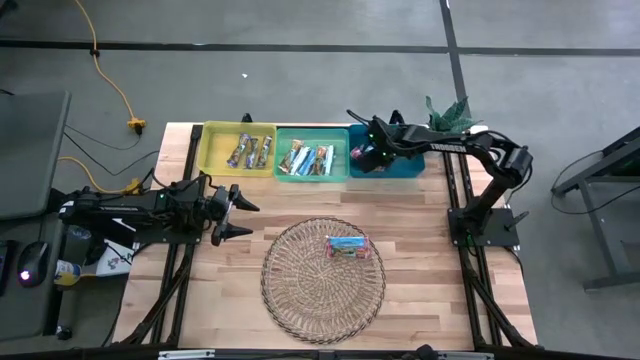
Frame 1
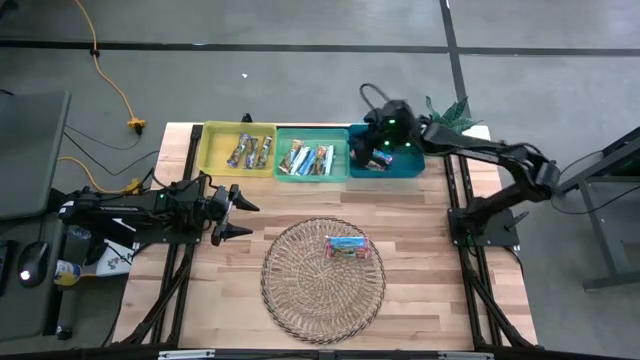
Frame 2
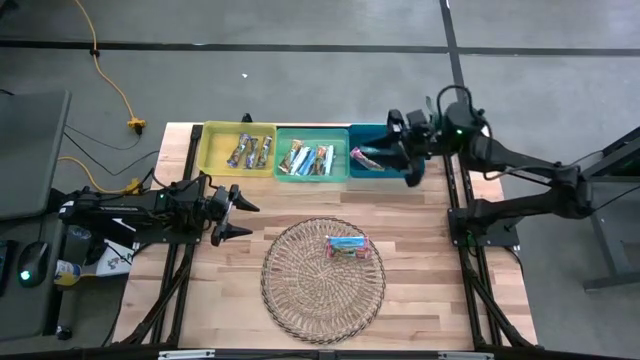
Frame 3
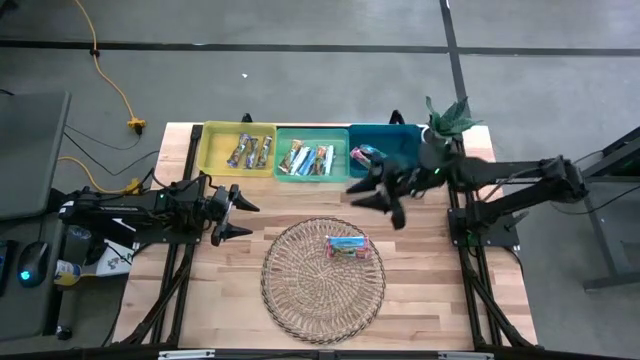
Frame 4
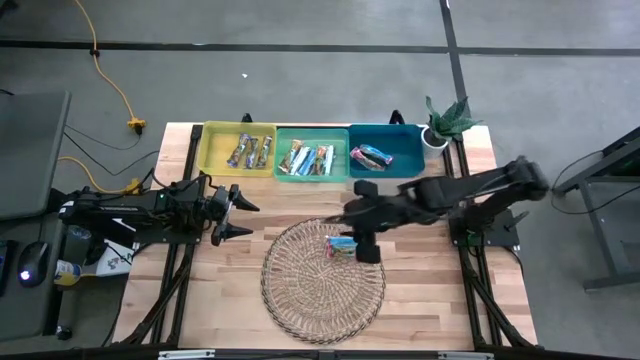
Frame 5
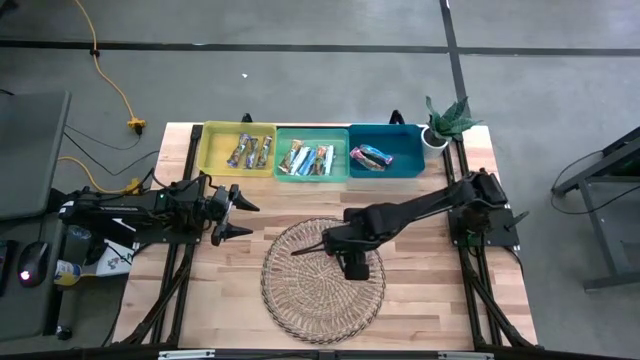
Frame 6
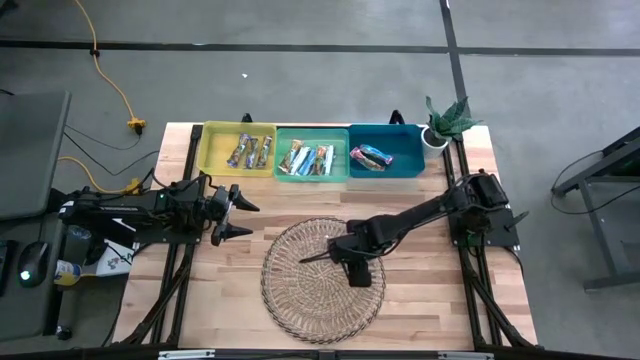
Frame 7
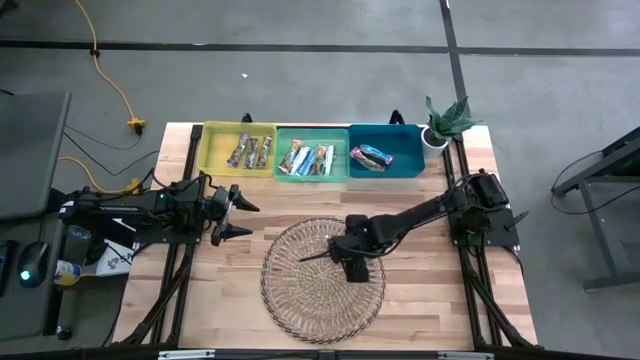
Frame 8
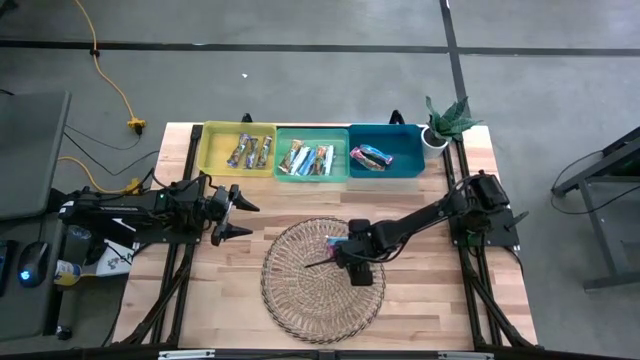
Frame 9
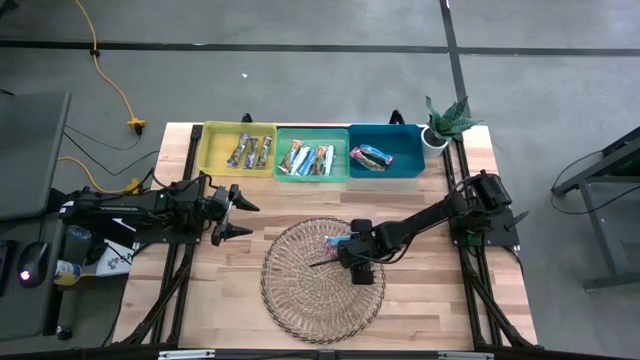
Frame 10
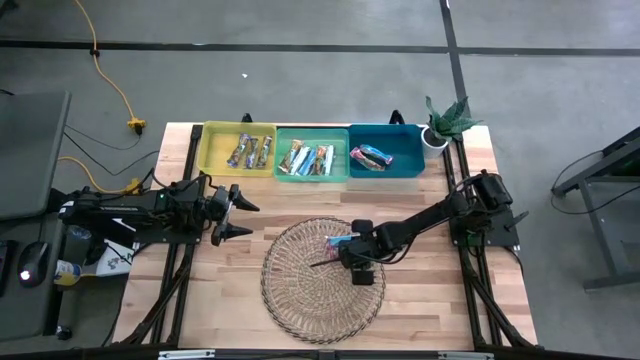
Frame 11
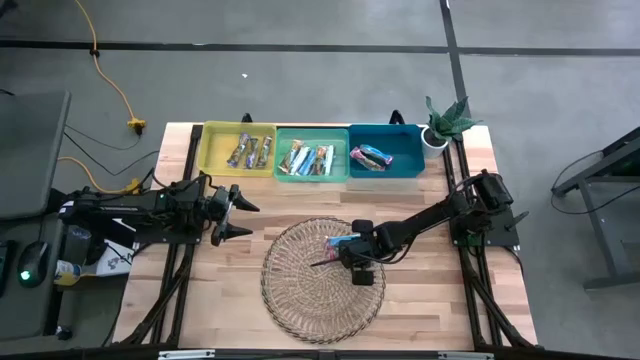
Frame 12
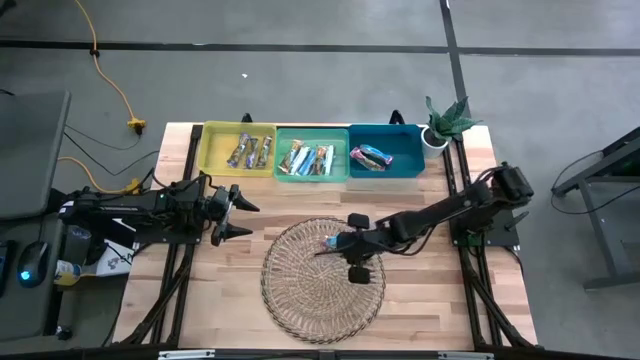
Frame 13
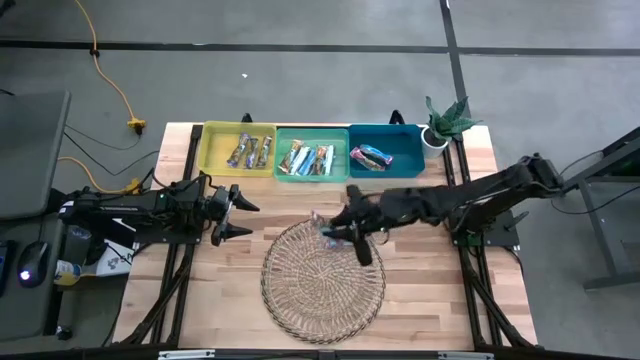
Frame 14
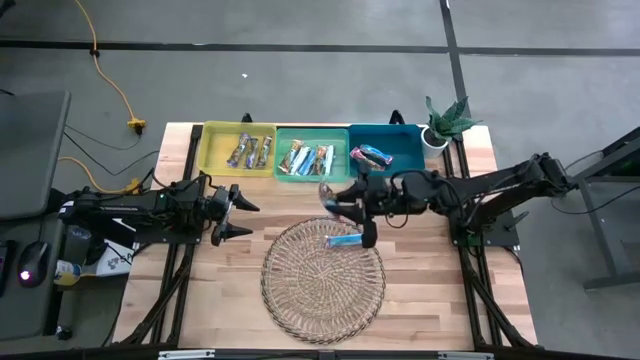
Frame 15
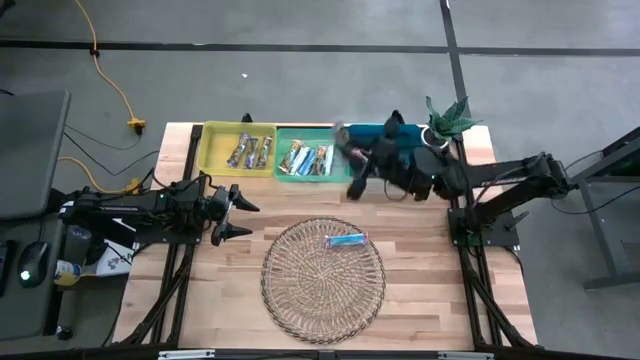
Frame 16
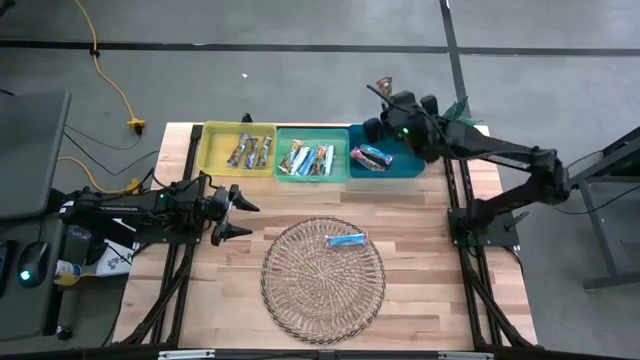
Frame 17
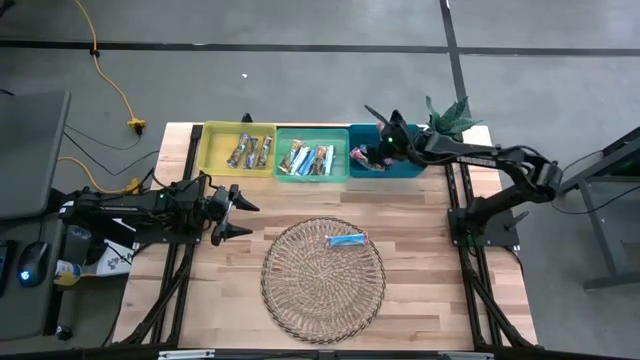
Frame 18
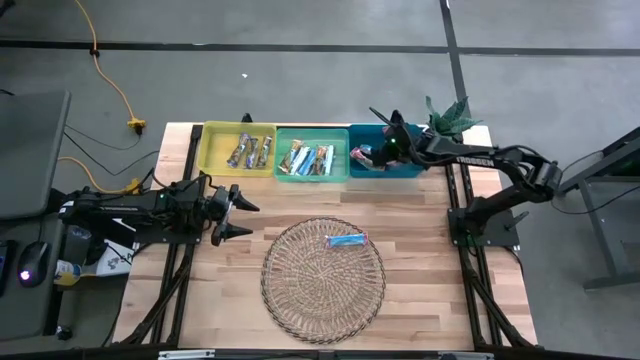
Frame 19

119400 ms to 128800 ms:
Task: Pick and place Granola Bars by type
Put the red granola bar into the blue bin

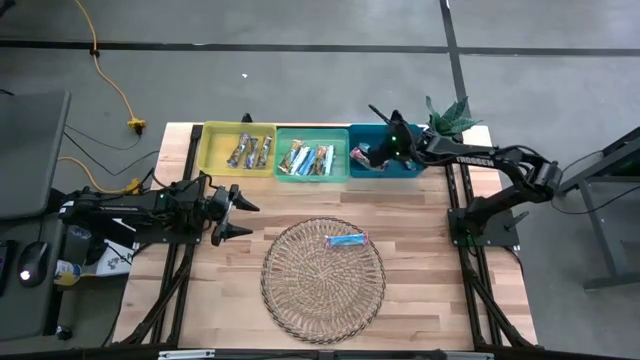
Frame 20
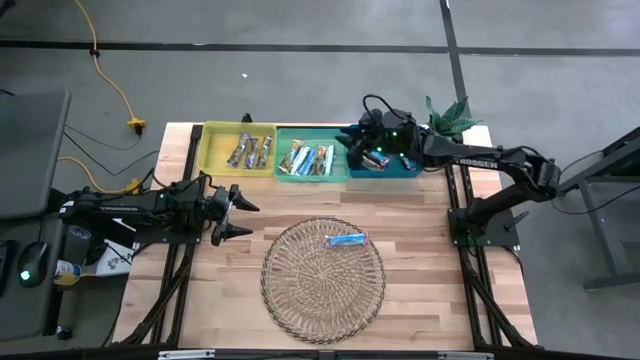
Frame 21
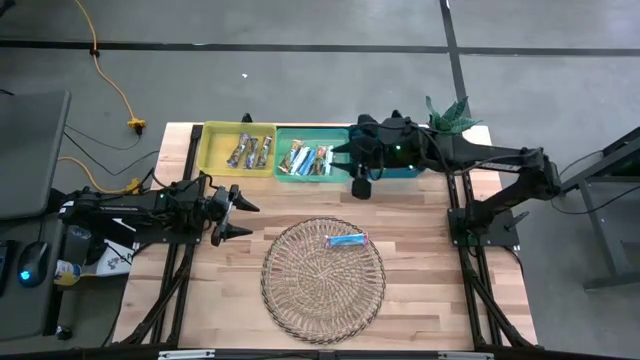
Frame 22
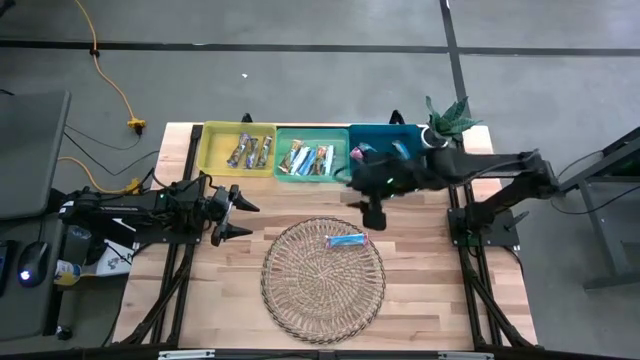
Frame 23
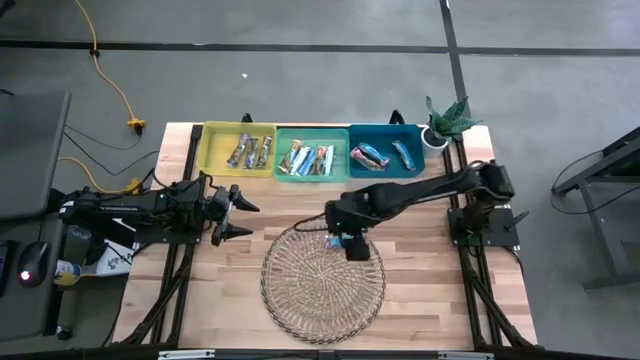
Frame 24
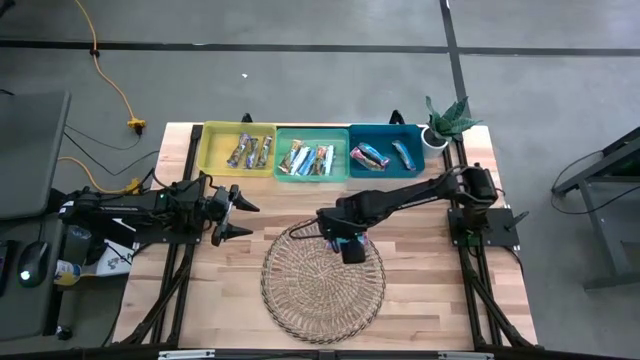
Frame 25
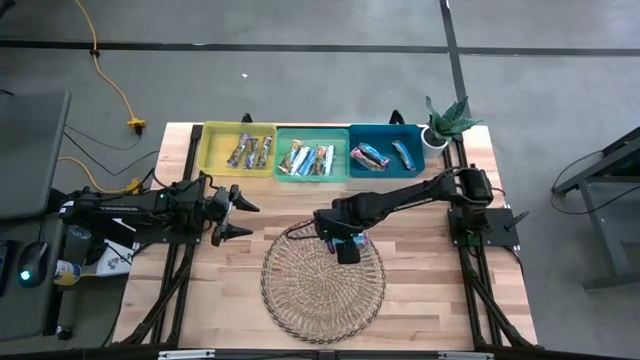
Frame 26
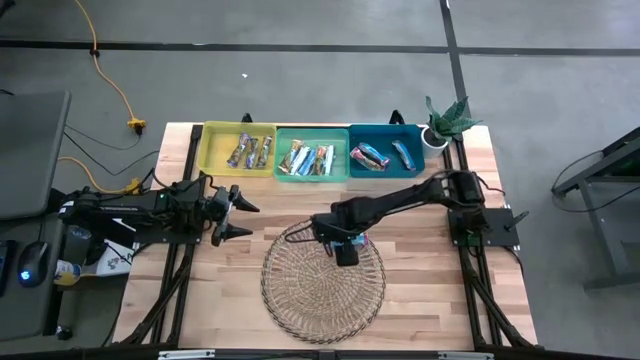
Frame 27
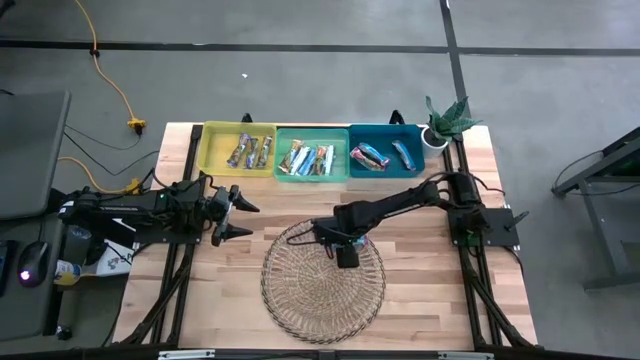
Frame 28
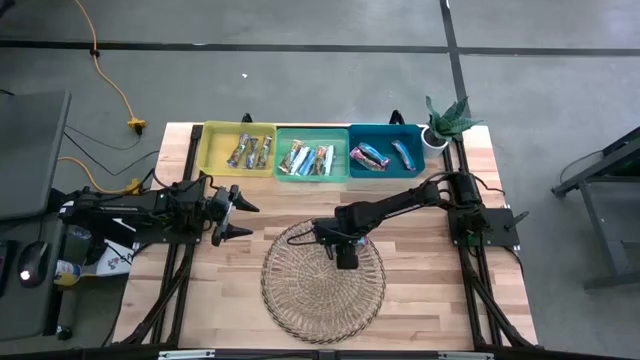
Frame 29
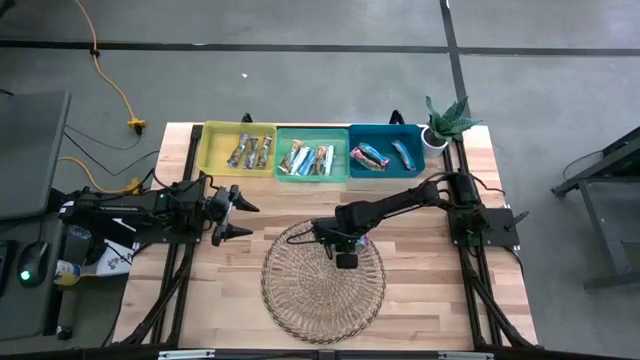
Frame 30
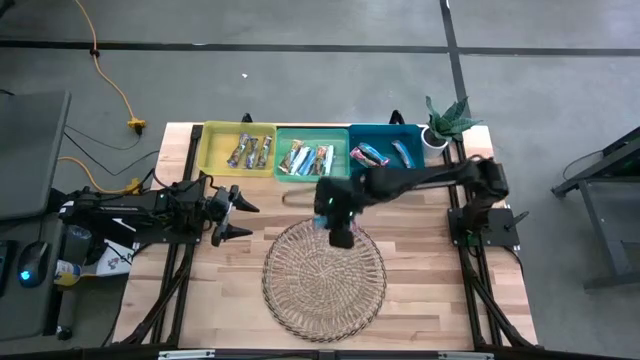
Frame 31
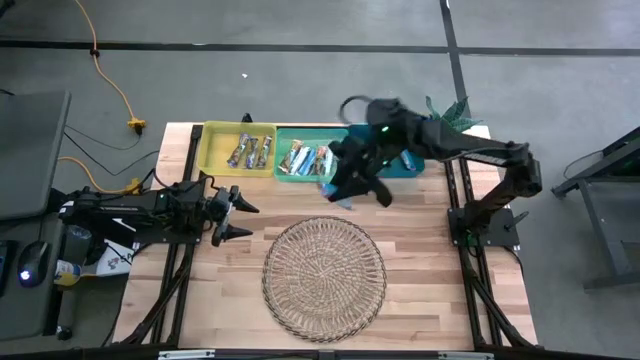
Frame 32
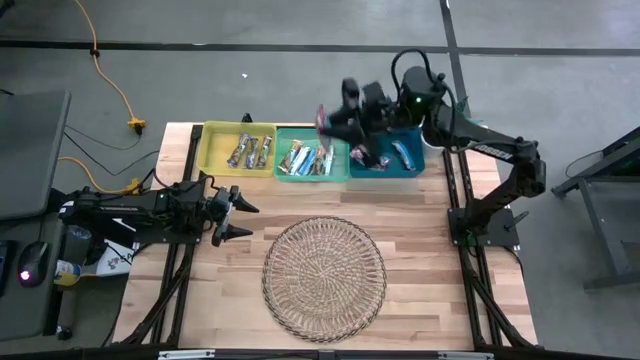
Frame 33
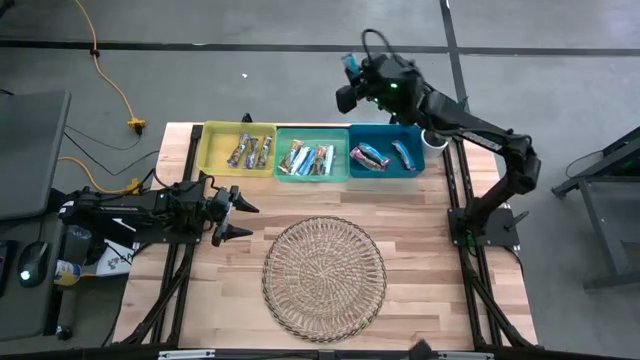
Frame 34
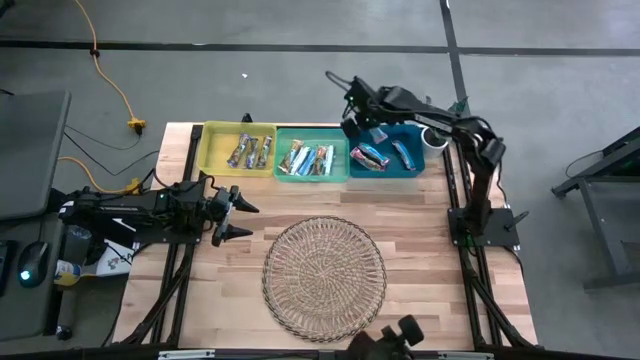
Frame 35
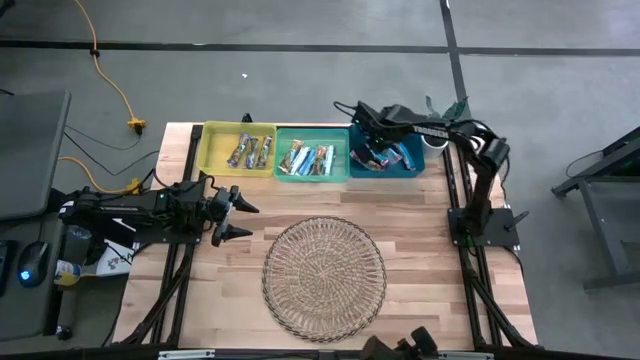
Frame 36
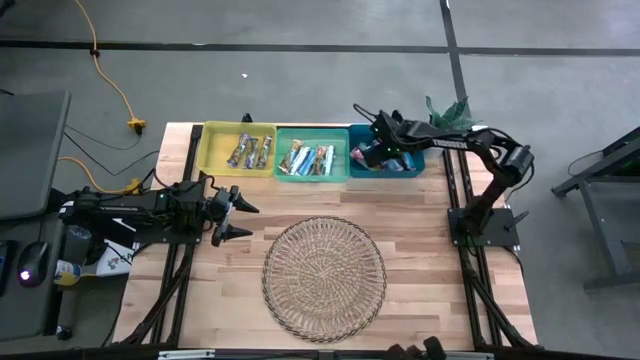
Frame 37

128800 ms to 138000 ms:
Put the red granola bar into the blue bin

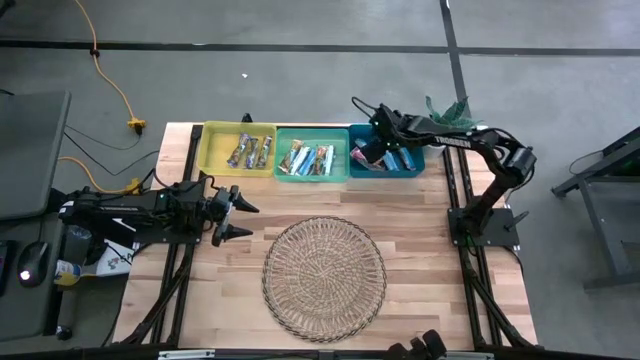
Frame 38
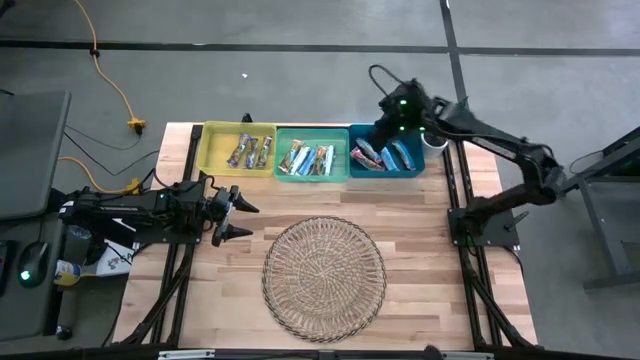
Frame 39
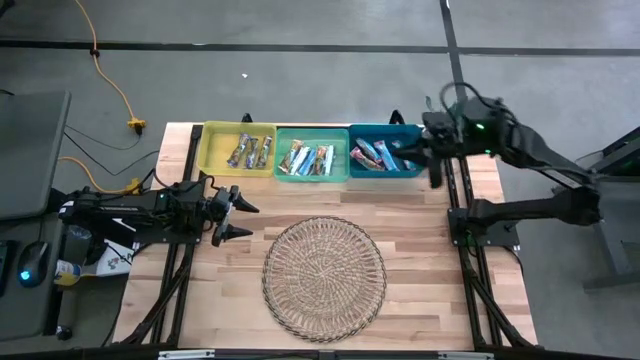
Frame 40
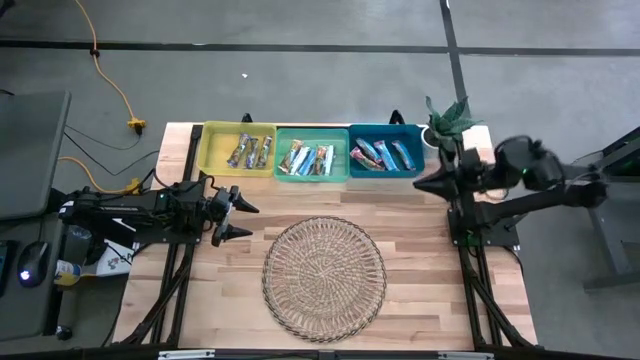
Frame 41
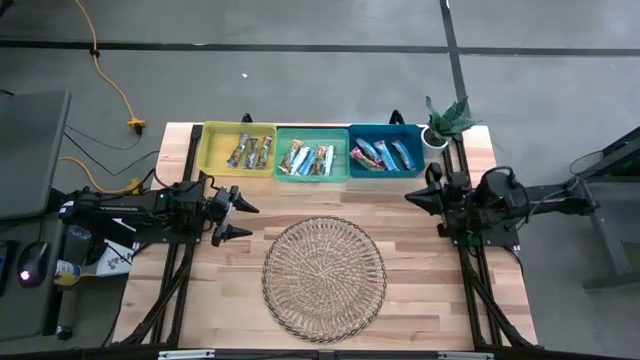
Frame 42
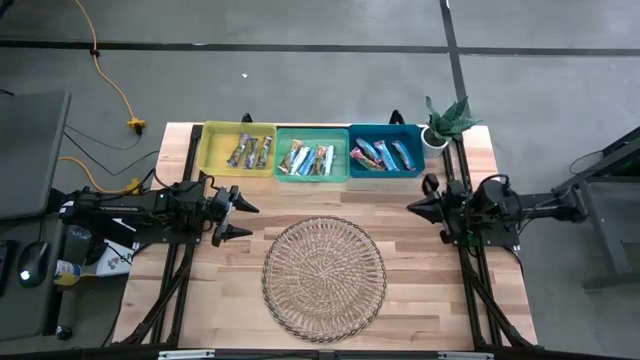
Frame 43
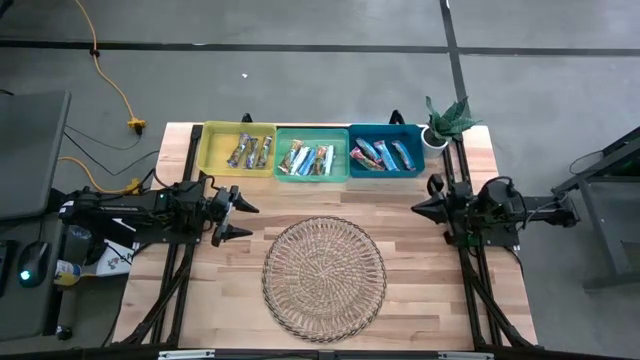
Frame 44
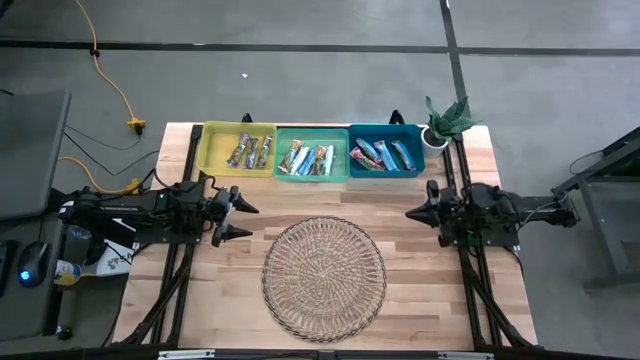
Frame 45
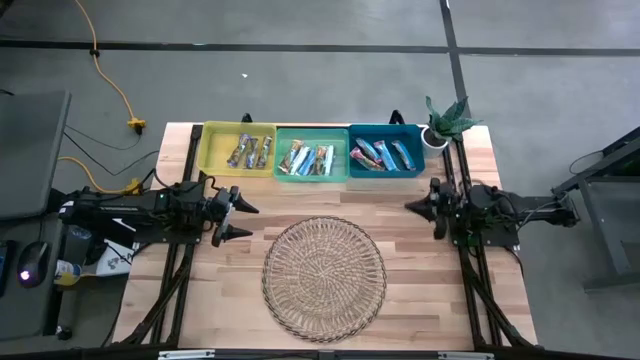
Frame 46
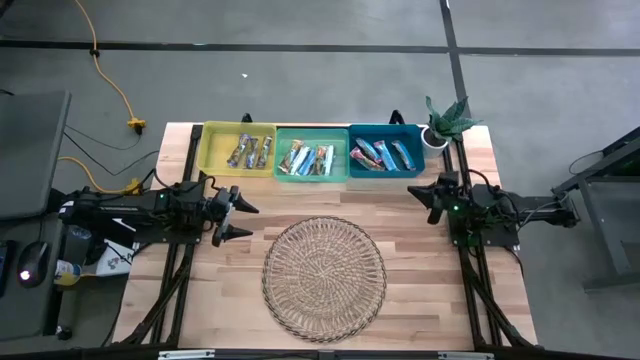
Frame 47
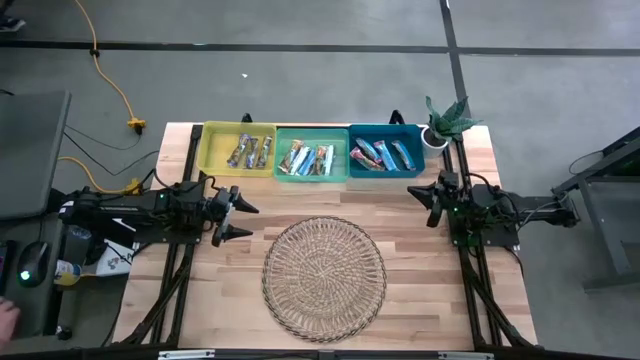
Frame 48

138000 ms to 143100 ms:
Return to Home Position
